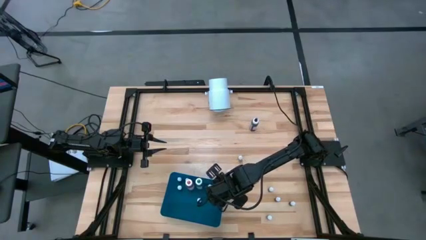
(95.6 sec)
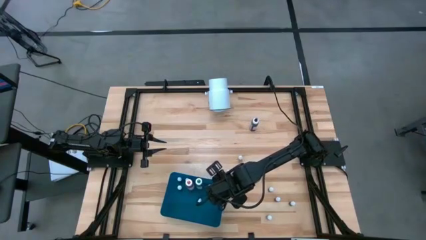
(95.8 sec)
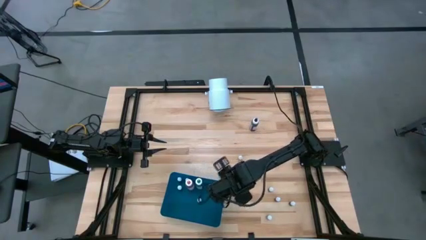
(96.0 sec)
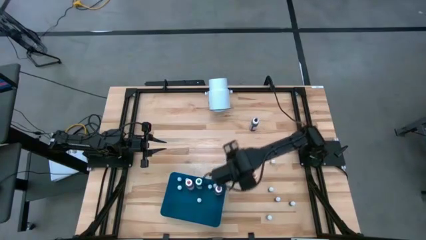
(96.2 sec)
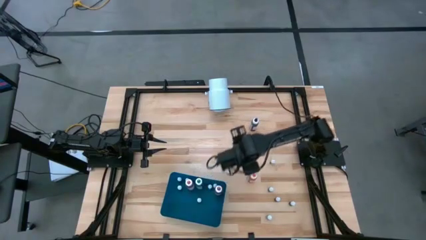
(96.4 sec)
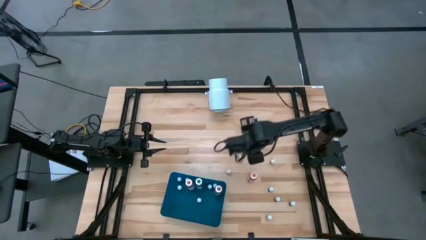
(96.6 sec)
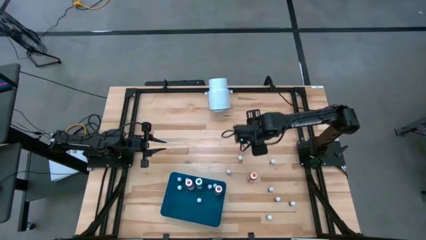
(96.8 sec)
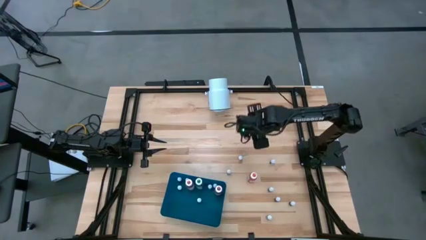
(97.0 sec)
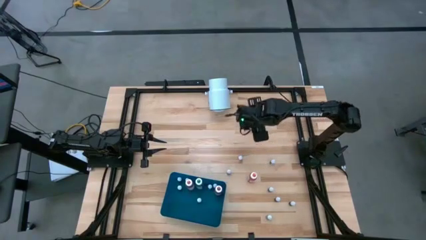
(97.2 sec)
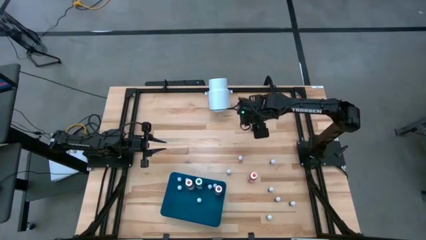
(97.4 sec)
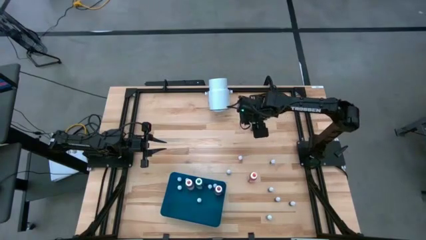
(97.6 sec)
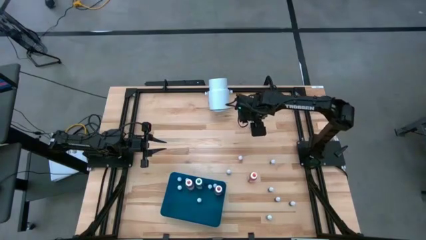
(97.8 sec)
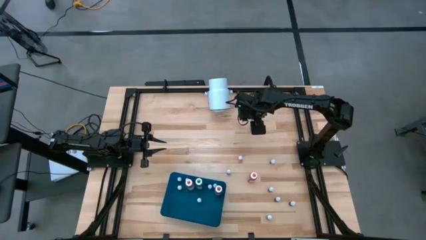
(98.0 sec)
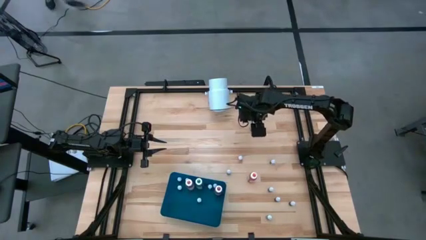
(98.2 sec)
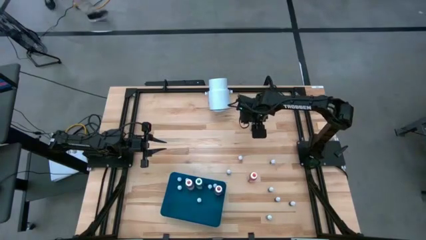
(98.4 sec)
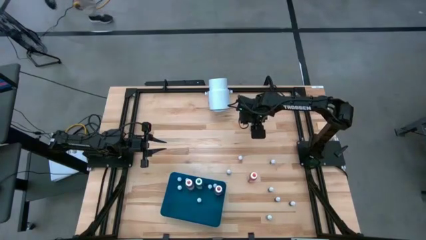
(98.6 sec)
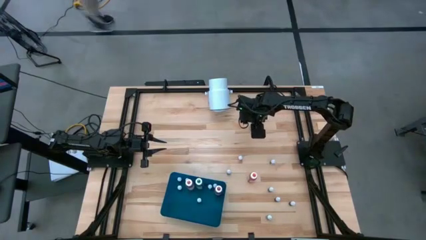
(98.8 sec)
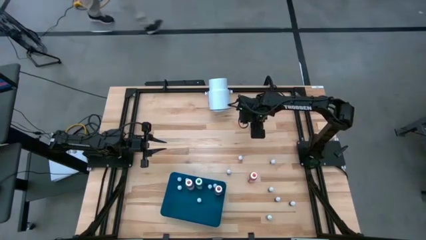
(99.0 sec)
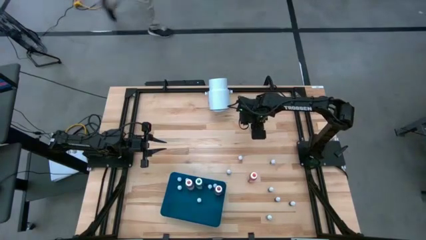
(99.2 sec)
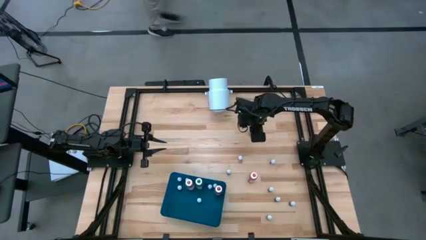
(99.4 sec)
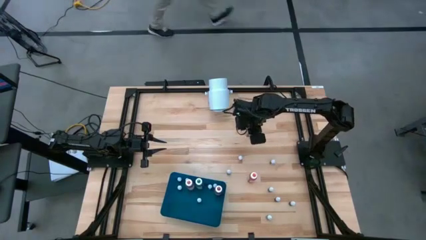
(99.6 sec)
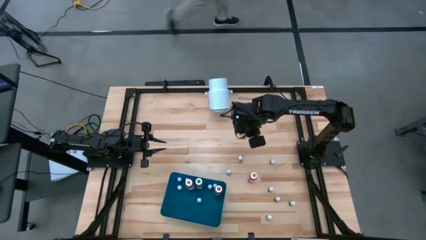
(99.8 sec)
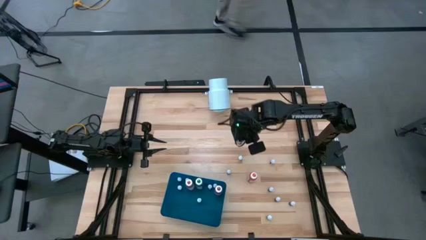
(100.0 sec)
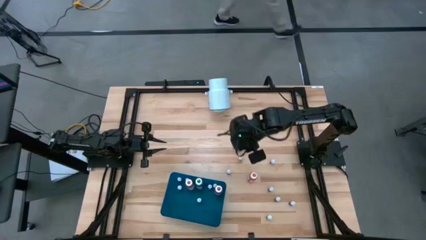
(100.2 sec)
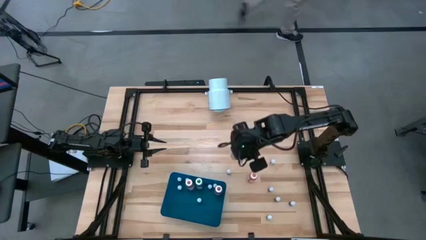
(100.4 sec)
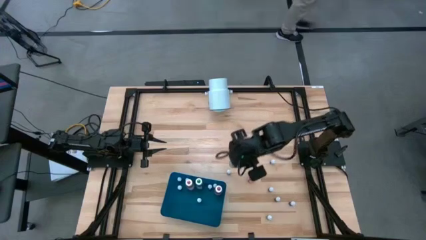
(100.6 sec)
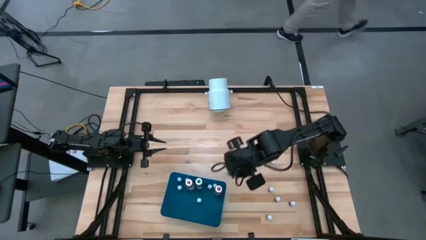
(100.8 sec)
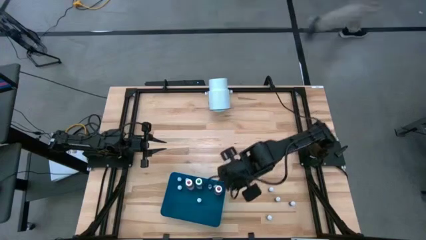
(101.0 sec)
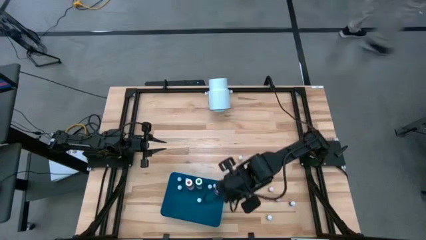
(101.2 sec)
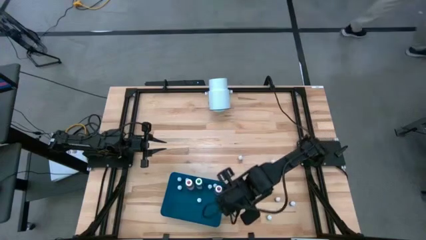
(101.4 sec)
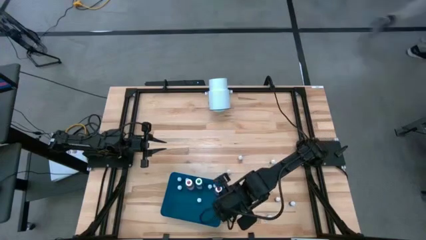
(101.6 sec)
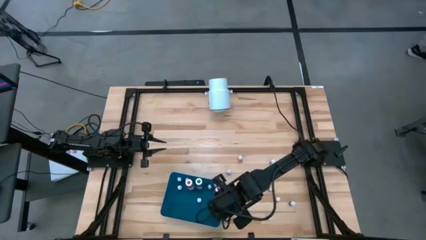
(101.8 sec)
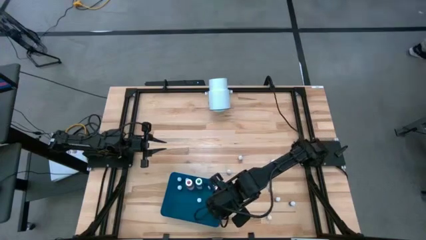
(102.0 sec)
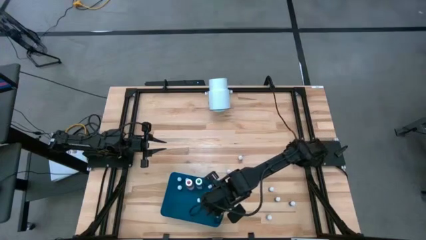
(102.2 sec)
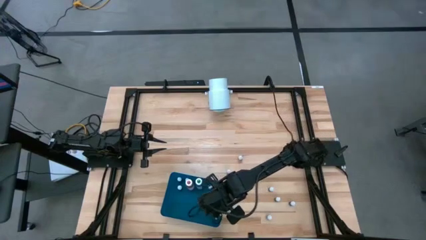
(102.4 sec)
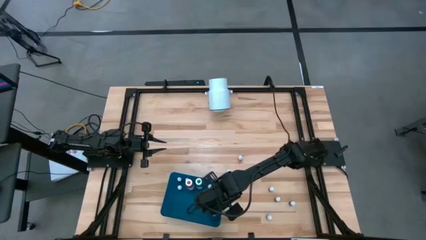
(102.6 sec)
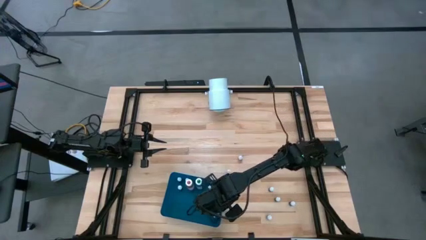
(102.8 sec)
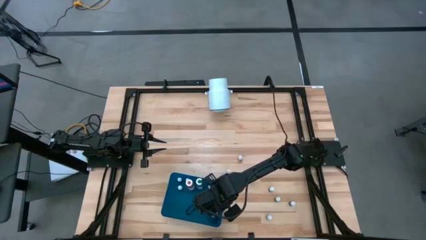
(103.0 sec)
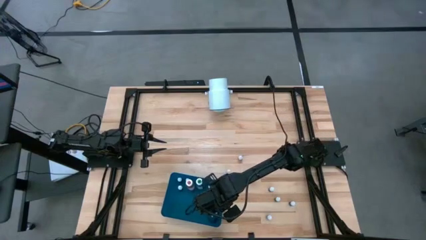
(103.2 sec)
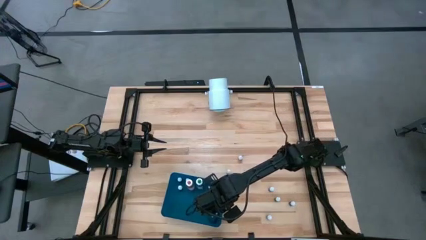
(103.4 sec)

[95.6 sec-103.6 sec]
Task: Pick & Place food coloring
Put the large black food coloring bottle into the blue bin

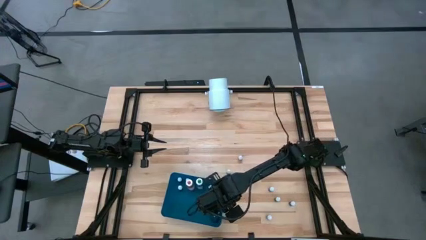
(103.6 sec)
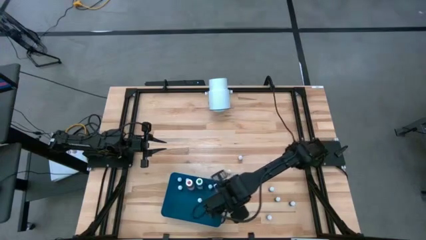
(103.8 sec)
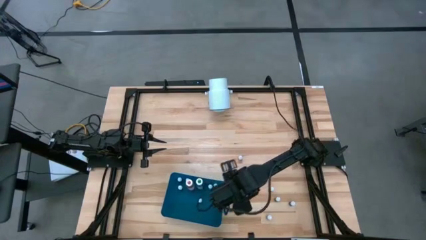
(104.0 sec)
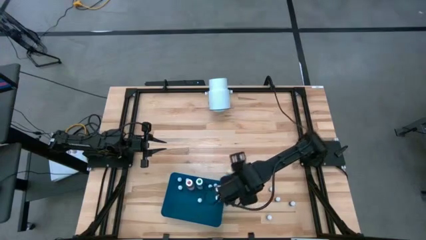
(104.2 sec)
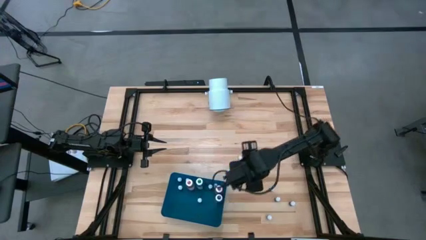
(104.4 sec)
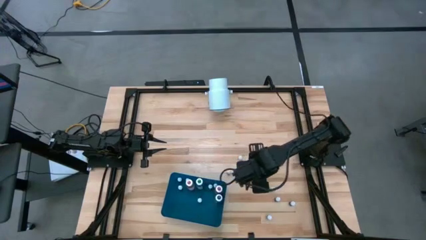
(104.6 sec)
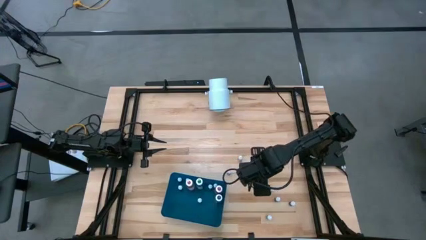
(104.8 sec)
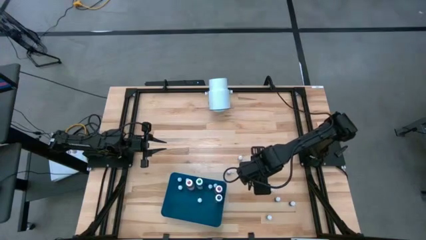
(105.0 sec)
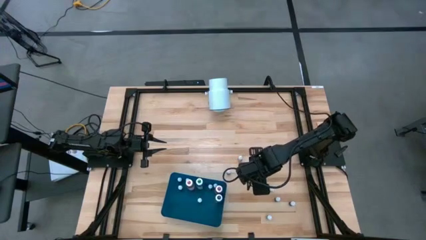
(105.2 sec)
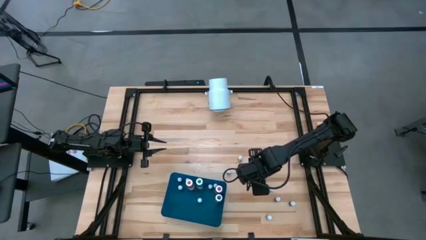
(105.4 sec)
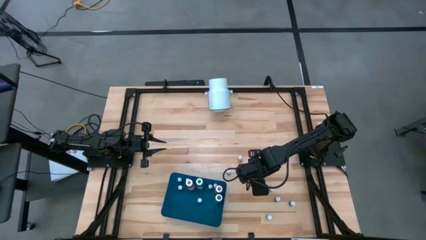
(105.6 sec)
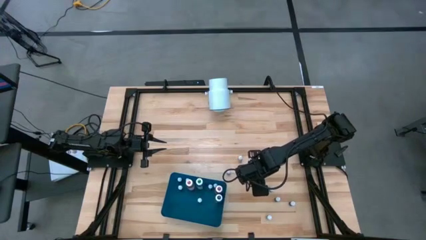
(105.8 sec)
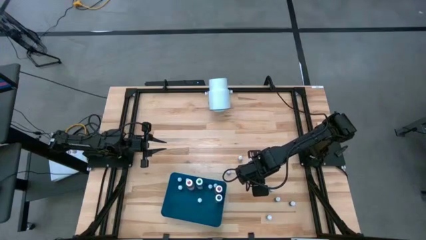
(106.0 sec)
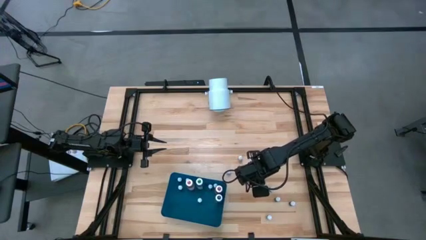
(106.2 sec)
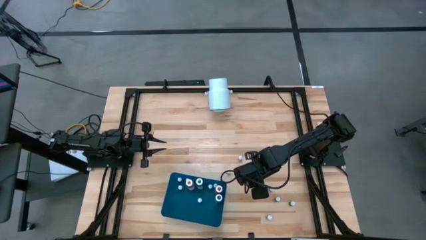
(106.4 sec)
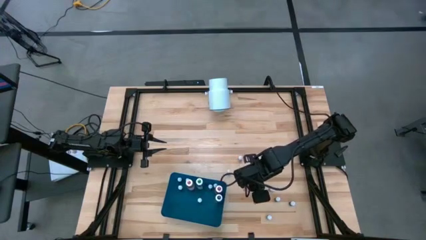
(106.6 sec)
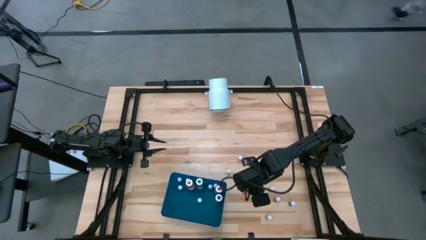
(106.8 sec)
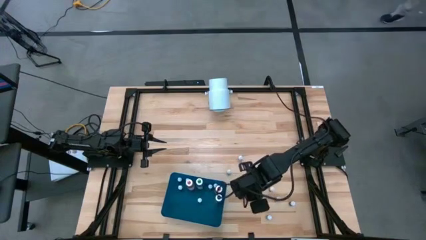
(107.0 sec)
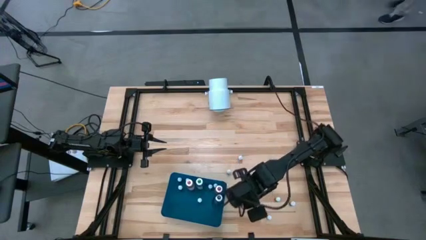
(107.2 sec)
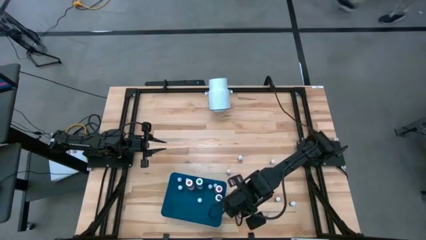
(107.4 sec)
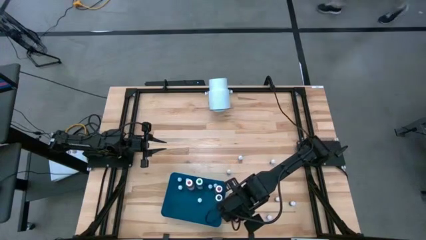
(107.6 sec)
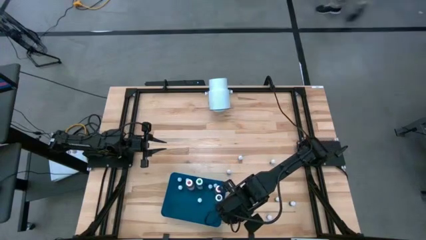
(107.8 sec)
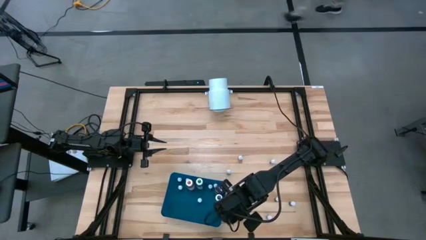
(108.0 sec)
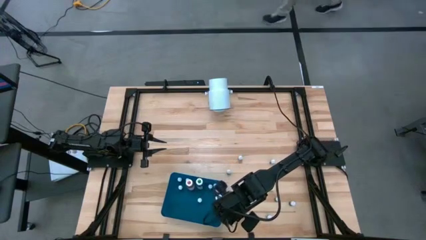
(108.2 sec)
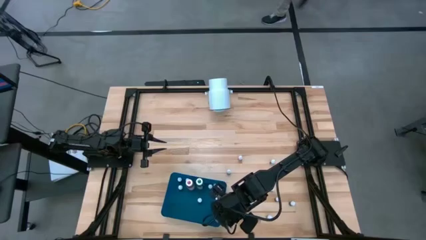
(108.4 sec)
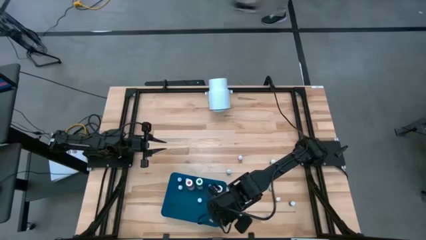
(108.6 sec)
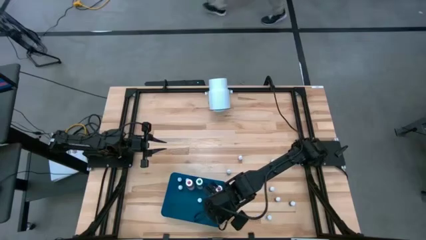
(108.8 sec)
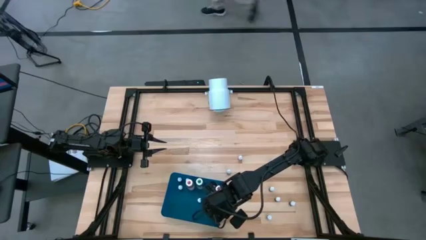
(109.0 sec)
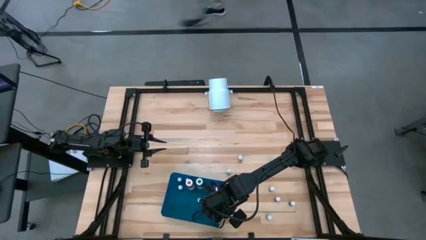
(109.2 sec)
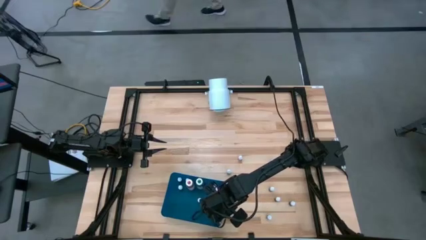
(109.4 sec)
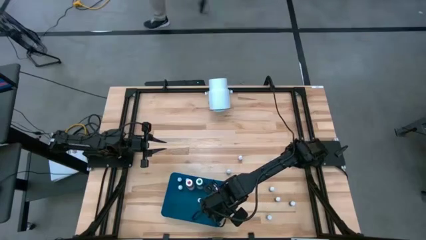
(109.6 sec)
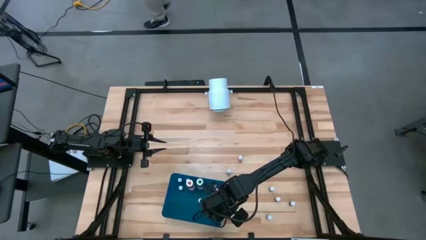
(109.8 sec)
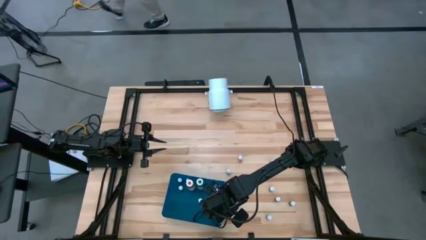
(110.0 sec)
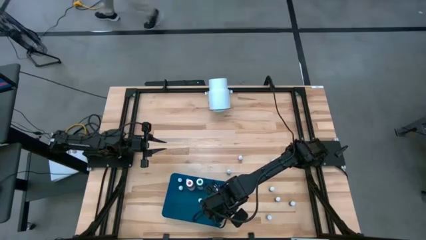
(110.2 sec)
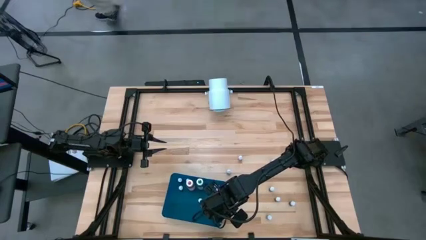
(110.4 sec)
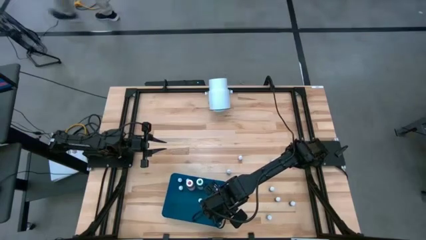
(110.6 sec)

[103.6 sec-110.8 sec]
Put the large orange food coloring bottle into the blue bin
